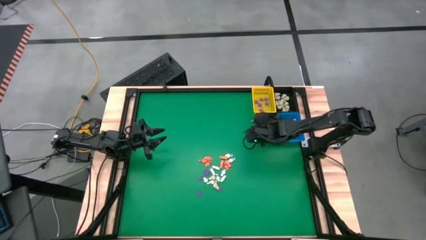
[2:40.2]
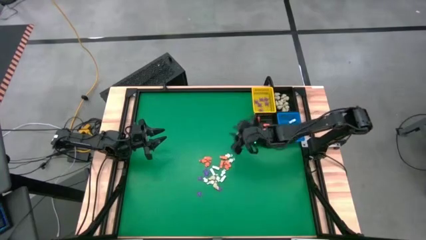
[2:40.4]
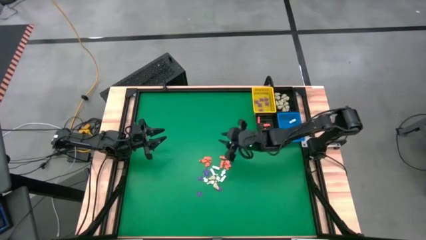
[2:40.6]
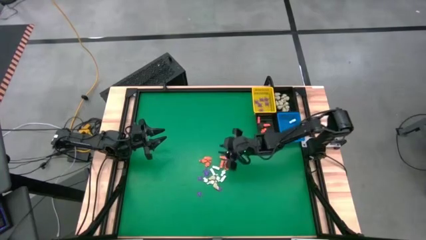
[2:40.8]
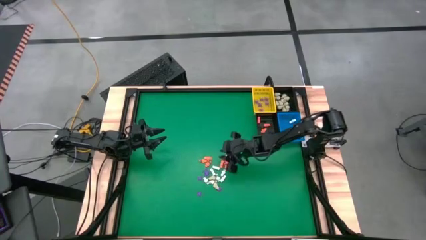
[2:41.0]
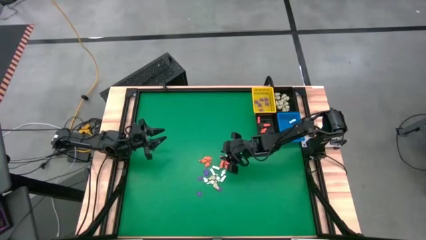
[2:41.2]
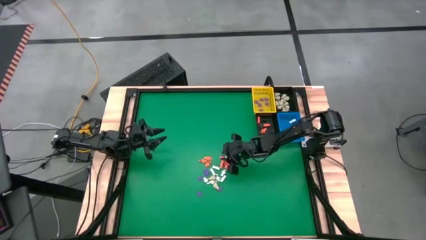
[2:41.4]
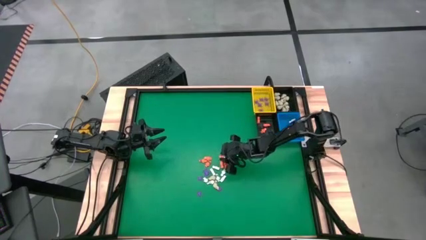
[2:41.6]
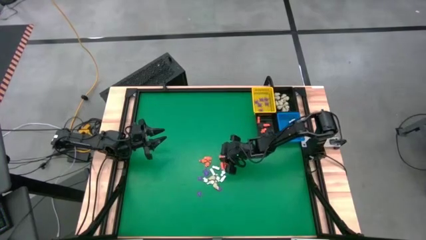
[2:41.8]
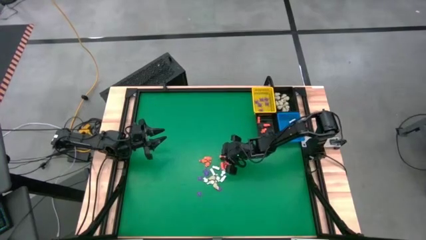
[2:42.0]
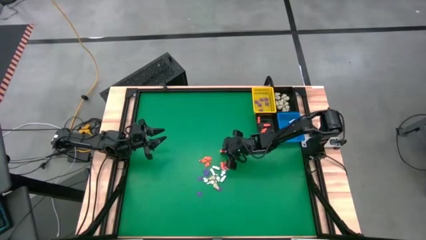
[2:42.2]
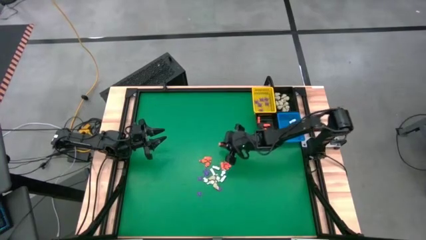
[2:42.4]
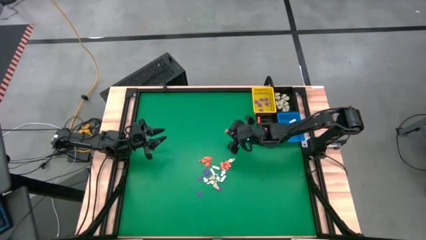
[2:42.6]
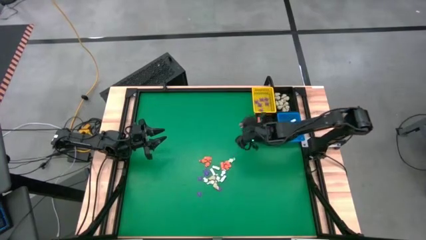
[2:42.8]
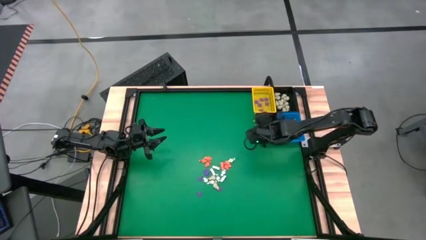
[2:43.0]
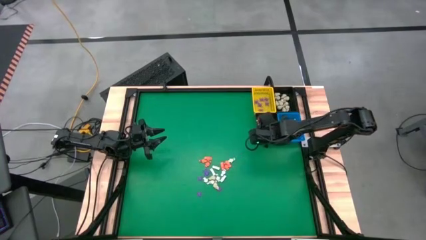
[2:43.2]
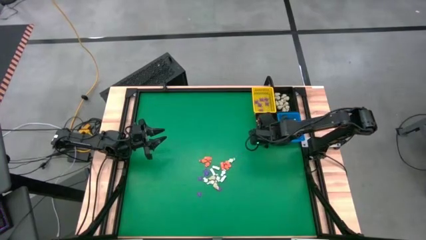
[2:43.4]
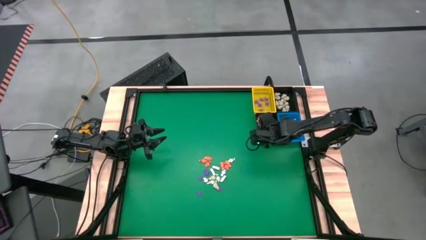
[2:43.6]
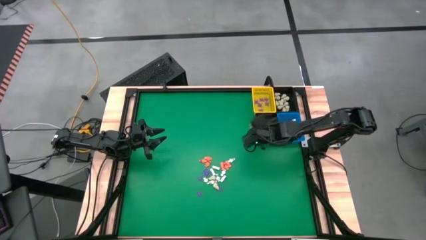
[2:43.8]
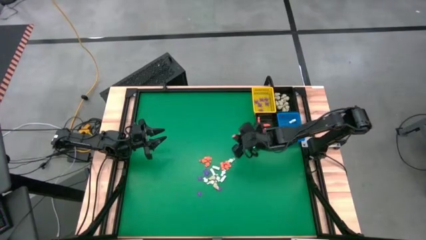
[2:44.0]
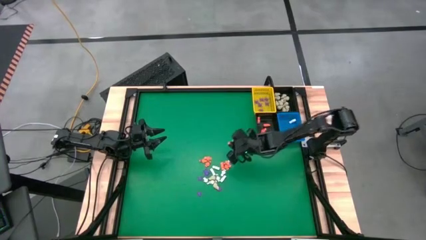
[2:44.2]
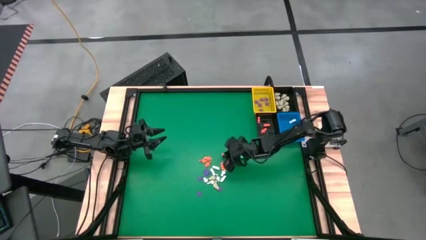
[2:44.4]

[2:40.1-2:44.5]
Task: Sort Halloween decoration
Put the orange skeleton toy into the bottom black basket

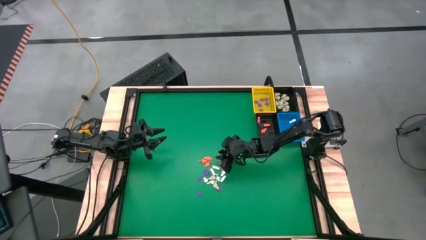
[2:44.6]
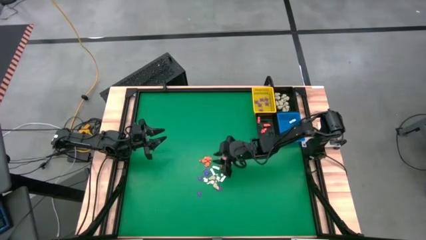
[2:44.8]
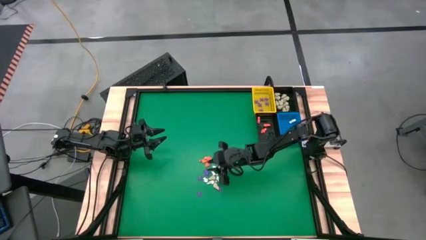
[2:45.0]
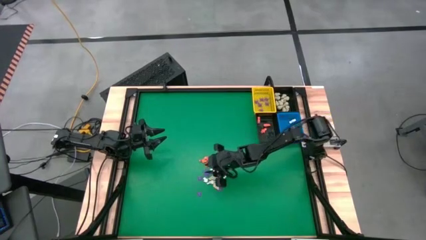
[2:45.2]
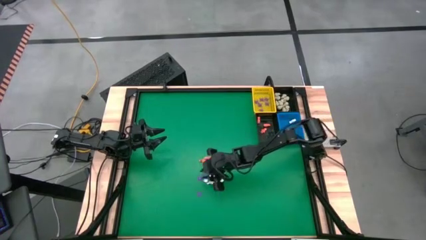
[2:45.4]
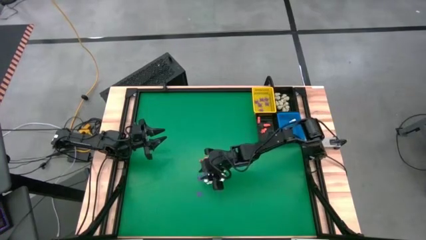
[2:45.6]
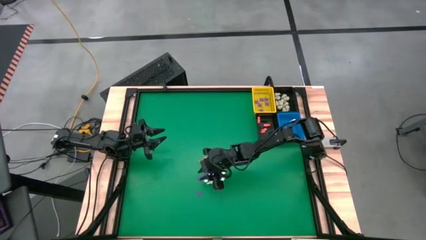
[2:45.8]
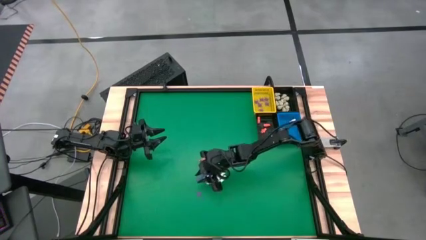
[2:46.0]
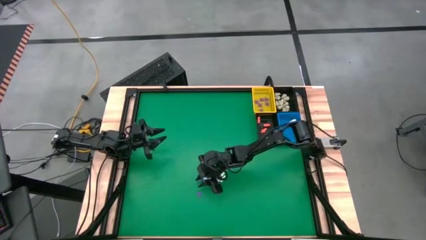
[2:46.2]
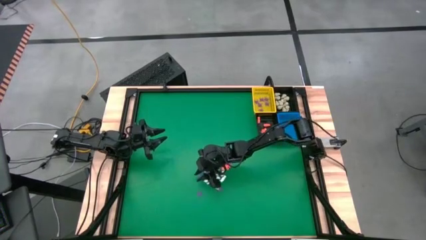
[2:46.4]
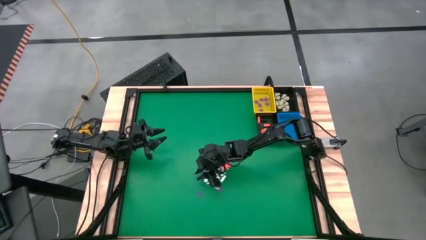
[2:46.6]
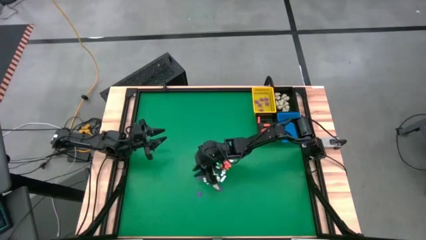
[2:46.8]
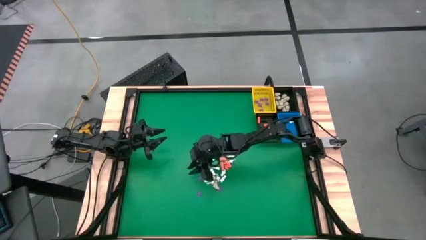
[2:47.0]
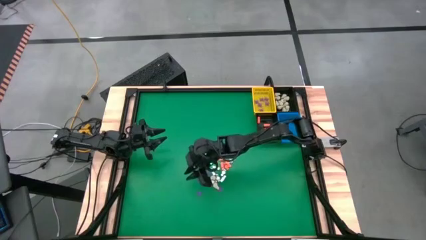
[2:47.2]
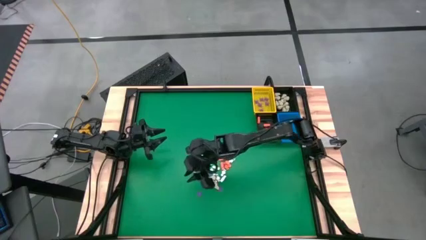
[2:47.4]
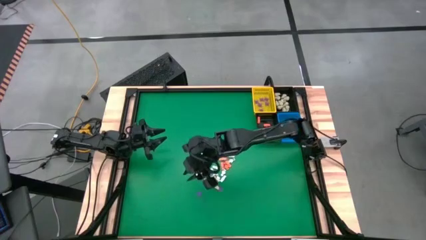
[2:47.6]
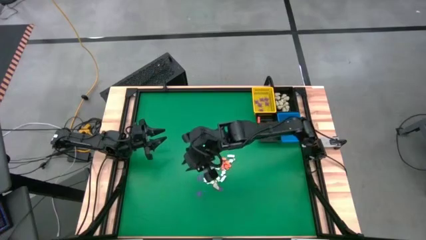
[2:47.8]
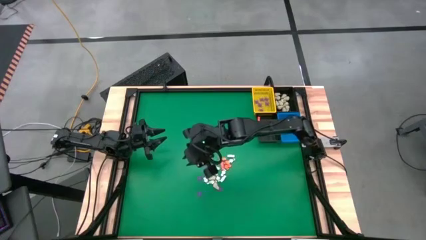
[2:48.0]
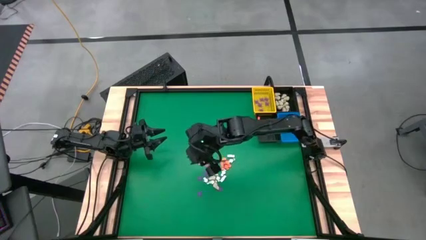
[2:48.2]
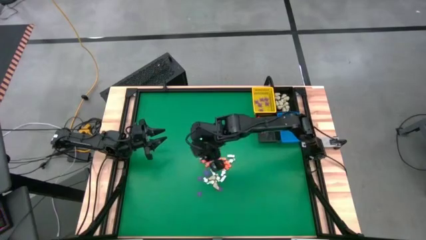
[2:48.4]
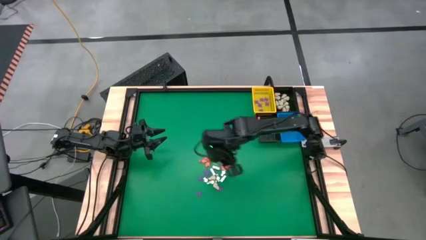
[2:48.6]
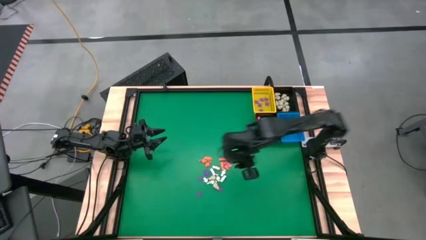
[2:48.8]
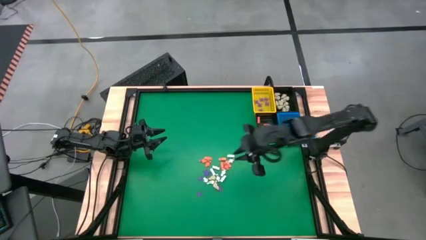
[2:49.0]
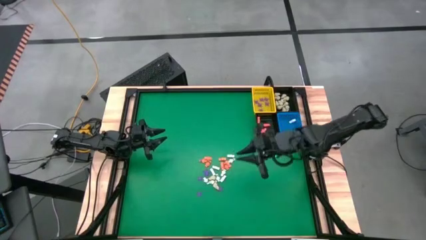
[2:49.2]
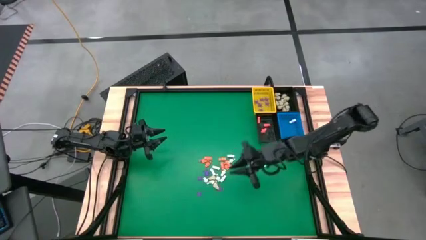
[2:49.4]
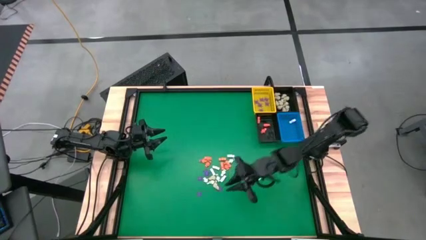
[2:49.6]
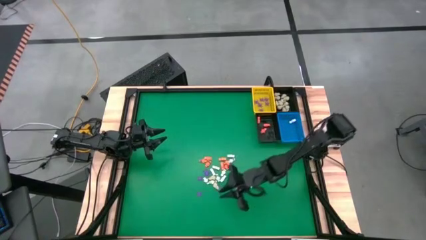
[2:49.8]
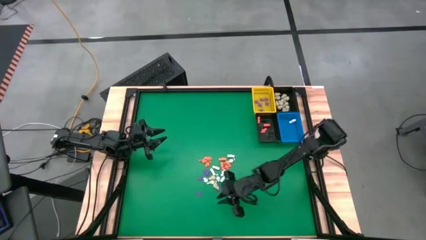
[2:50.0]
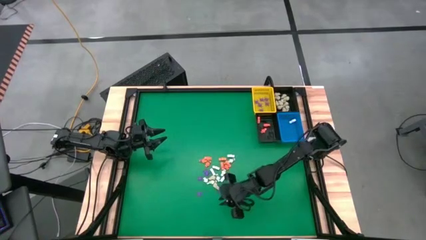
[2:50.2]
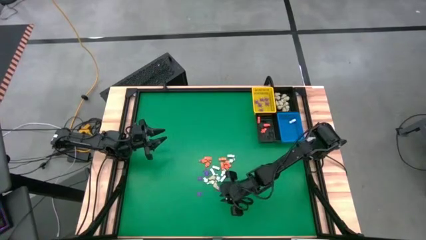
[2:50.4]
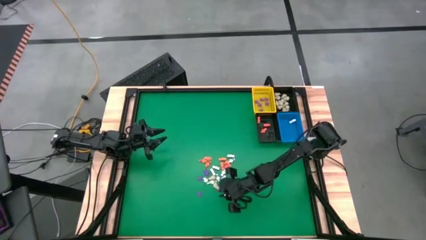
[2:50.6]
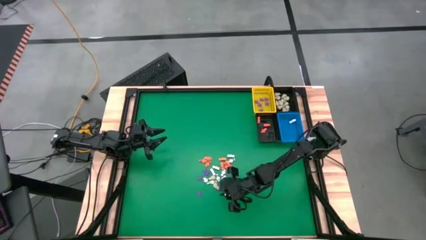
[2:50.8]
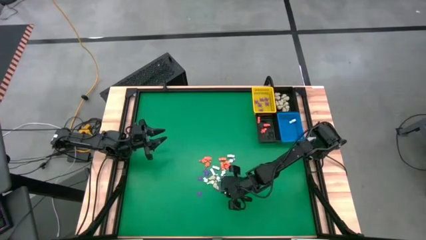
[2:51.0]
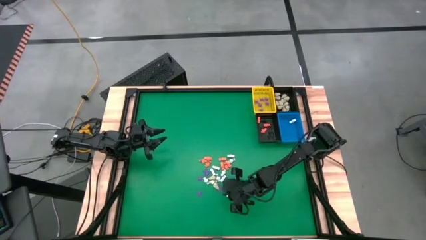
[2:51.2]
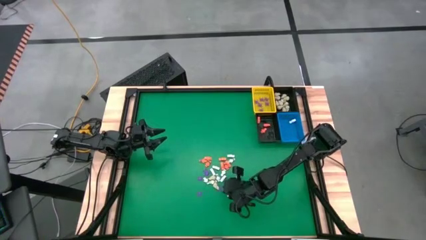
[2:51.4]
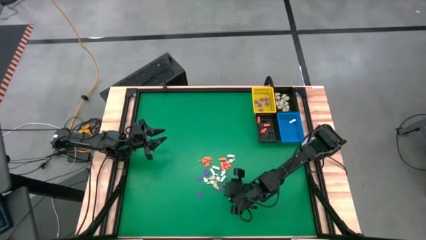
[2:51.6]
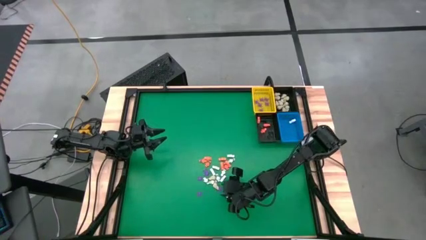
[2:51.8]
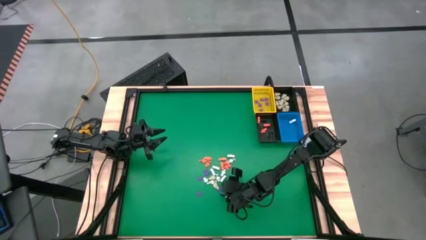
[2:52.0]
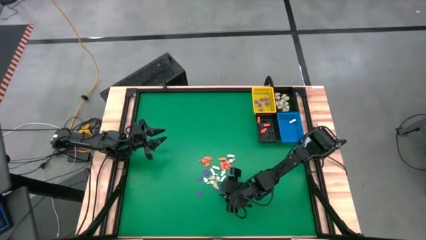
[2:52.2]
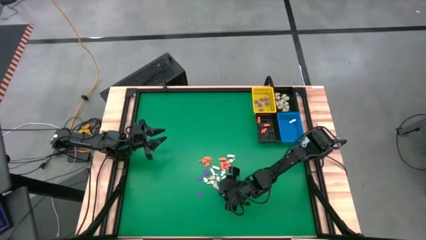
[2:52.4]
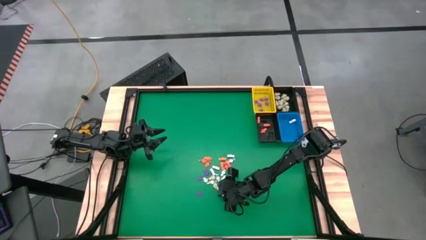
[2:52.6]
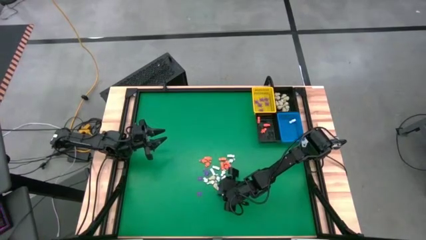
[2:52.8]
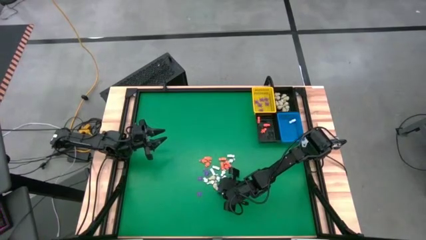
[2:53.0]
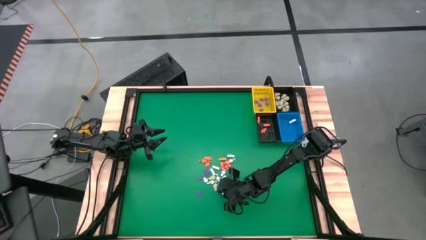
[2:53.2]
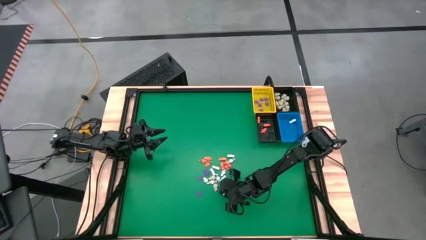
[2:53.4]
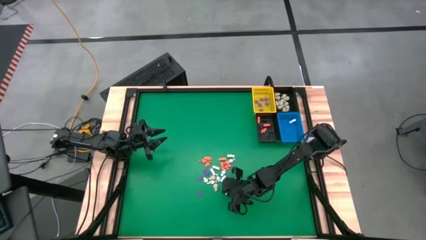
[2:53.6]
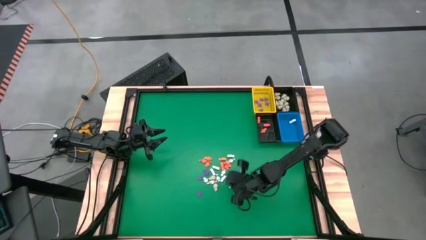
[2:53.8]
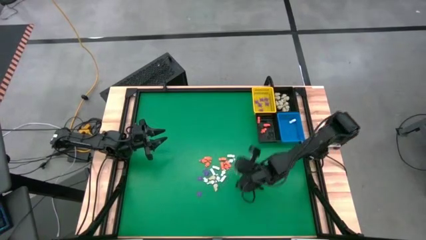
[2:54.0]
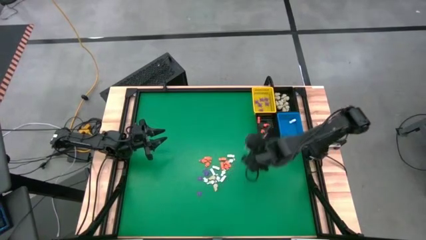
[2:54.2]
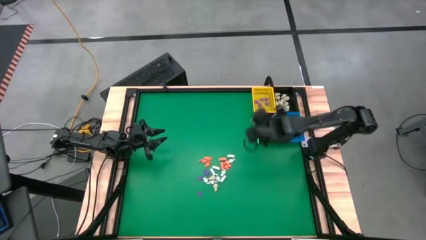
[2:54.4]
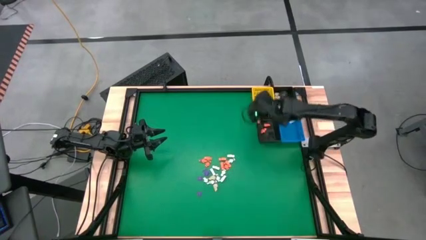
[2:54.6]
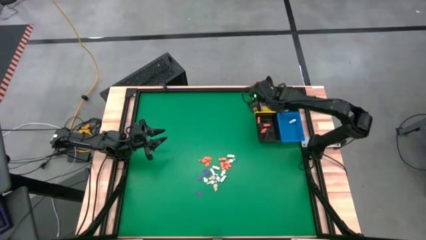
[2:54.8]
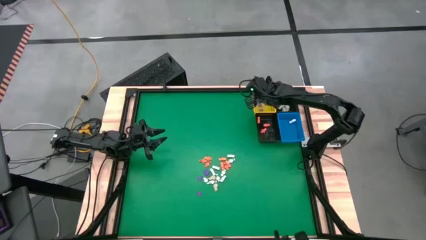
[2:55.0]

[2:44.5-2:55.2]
Put the purple spider toy into the yellow basket
